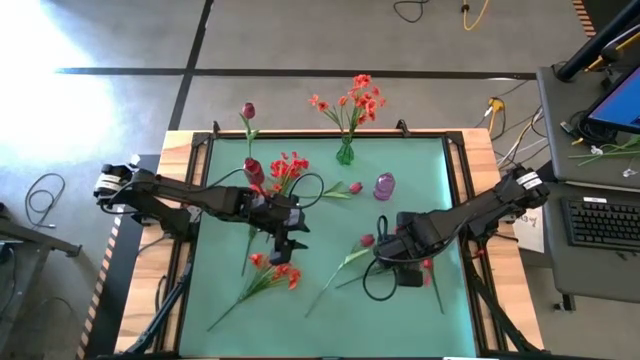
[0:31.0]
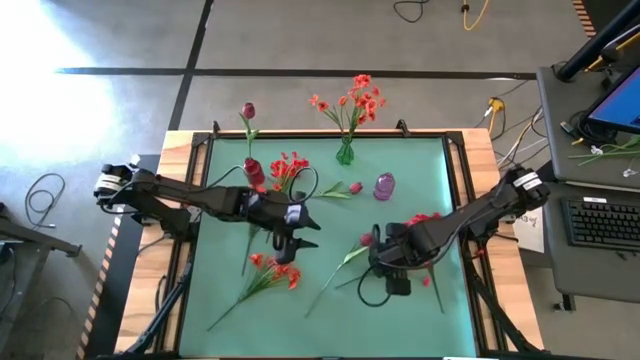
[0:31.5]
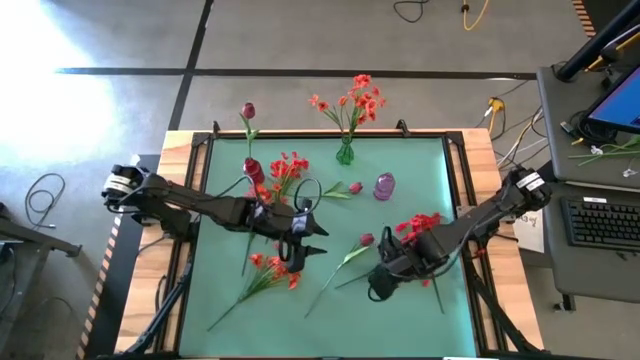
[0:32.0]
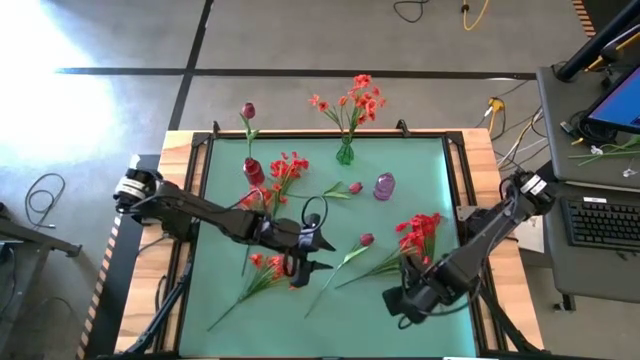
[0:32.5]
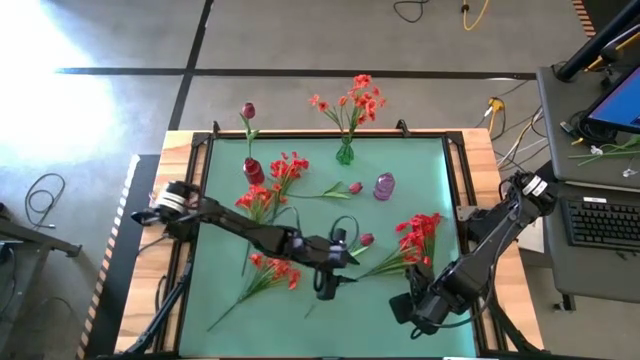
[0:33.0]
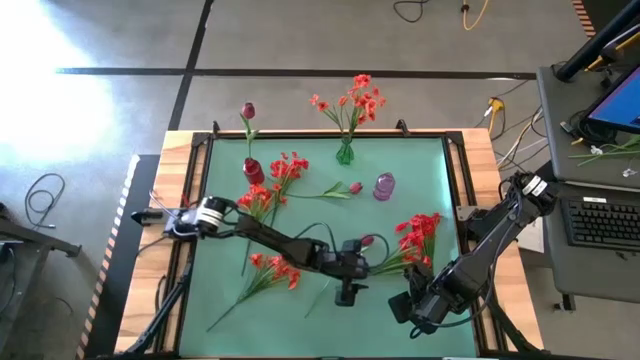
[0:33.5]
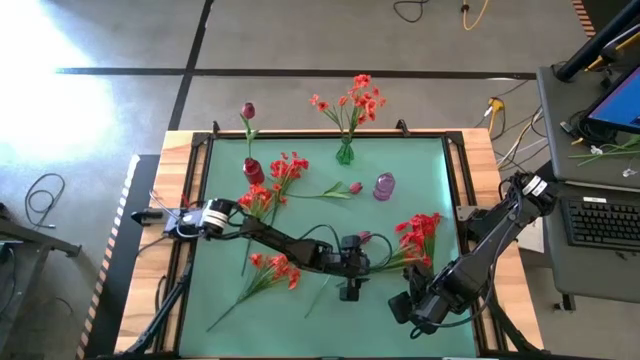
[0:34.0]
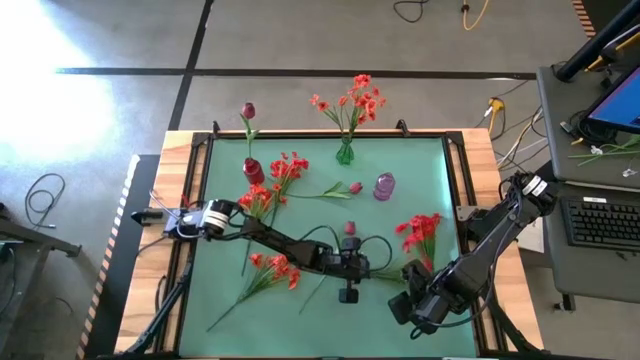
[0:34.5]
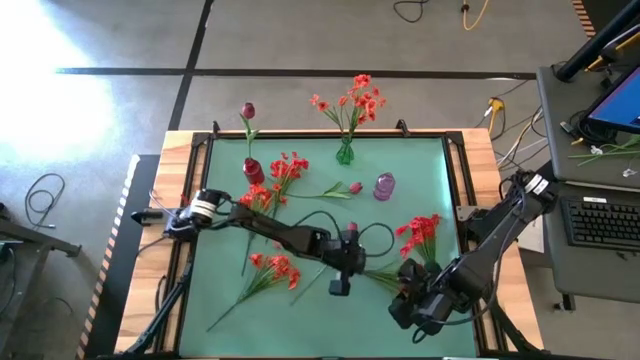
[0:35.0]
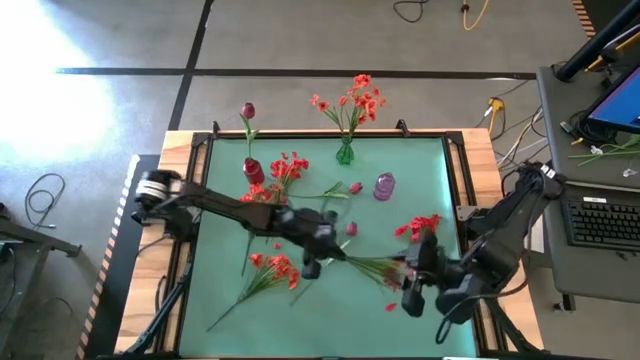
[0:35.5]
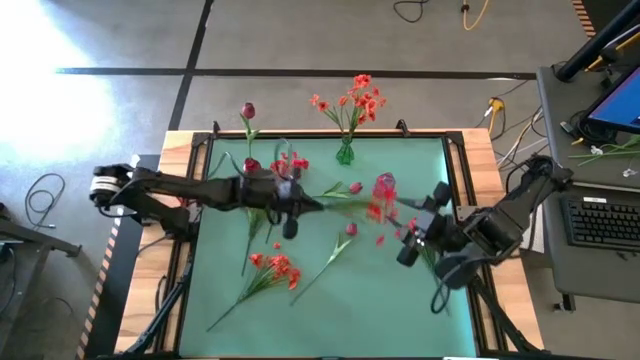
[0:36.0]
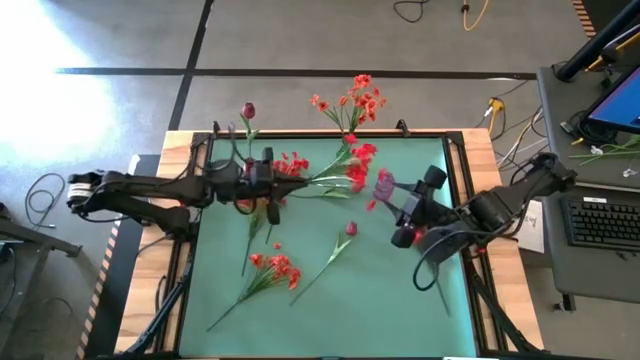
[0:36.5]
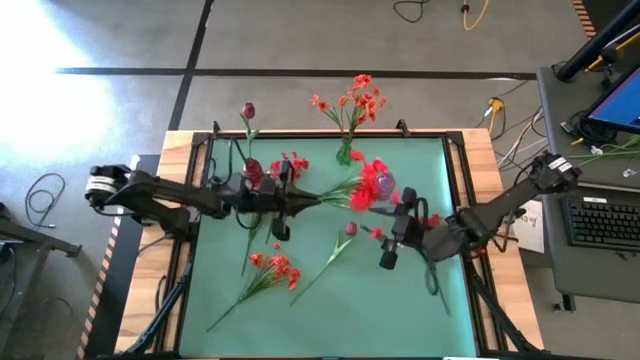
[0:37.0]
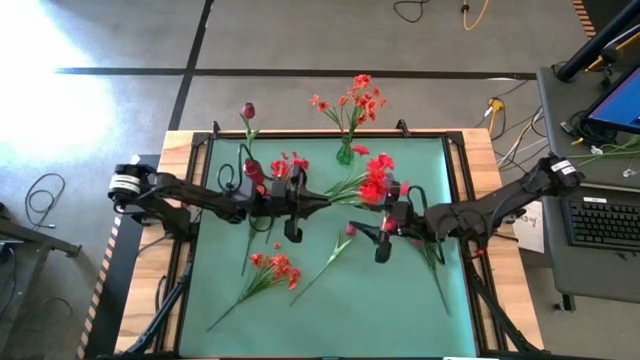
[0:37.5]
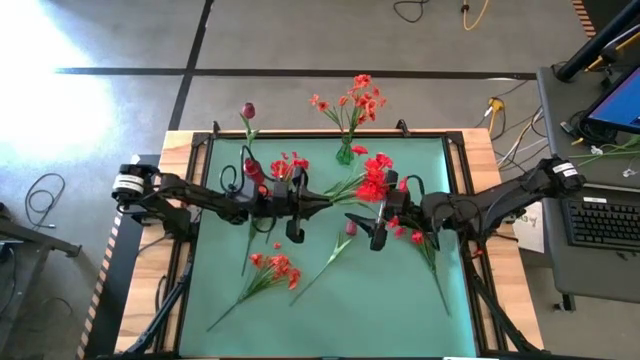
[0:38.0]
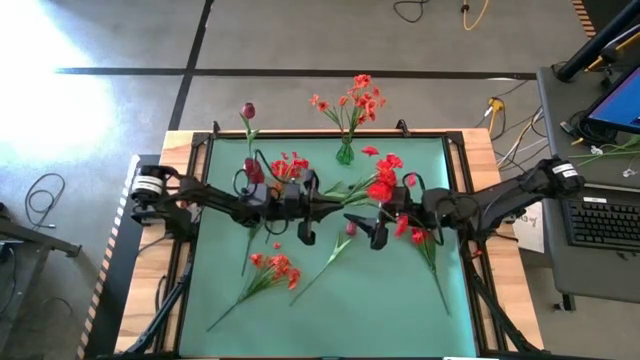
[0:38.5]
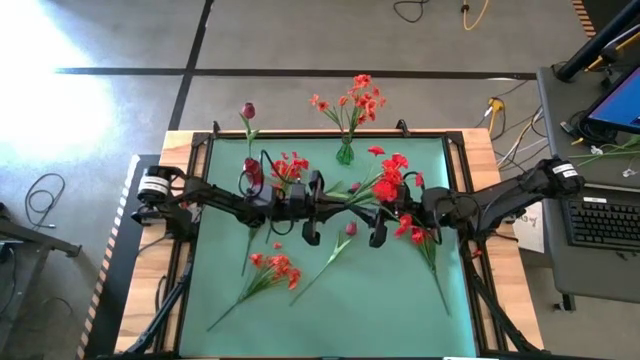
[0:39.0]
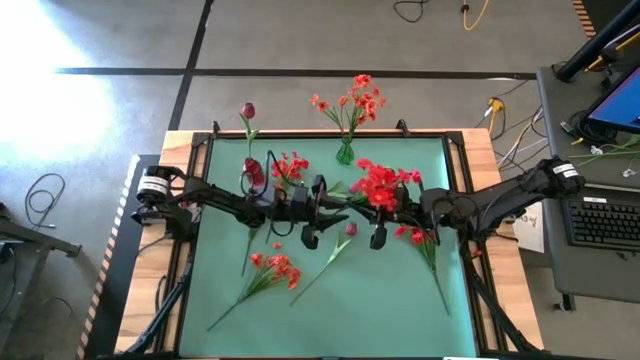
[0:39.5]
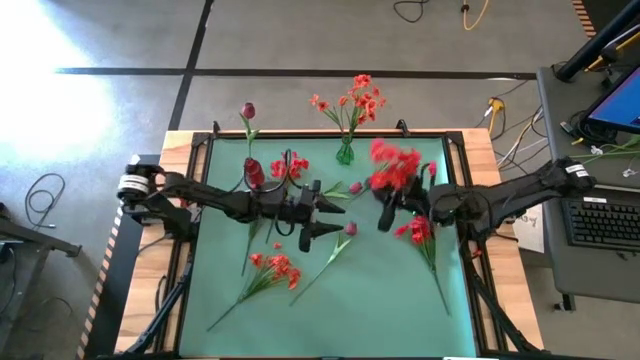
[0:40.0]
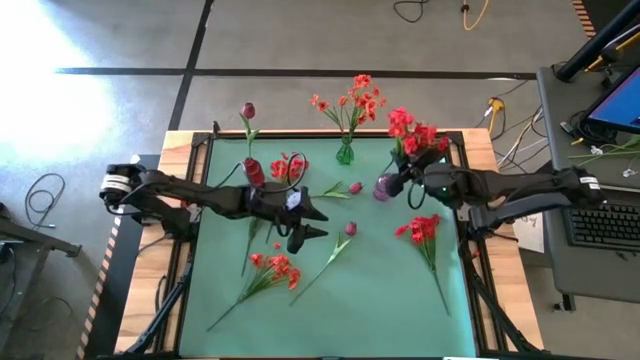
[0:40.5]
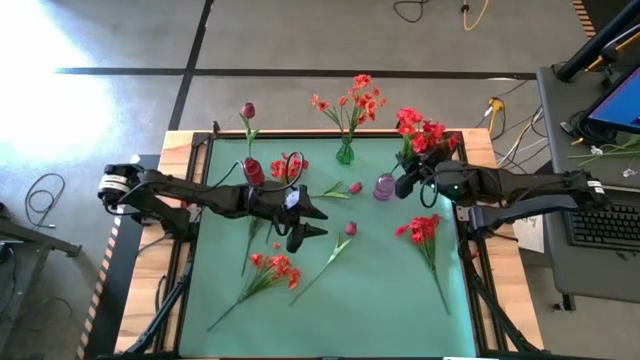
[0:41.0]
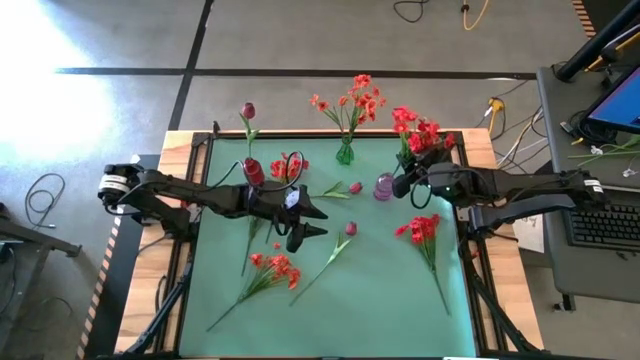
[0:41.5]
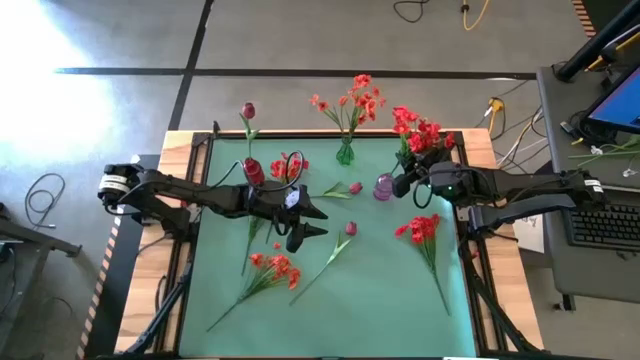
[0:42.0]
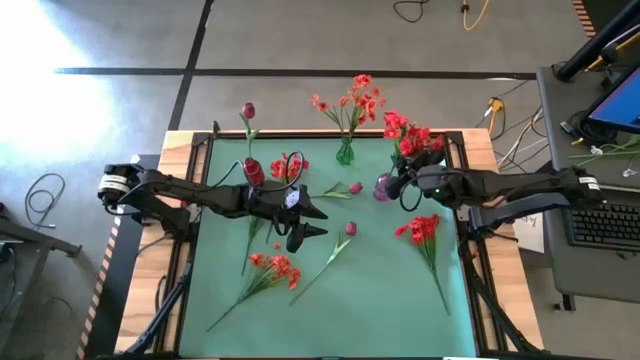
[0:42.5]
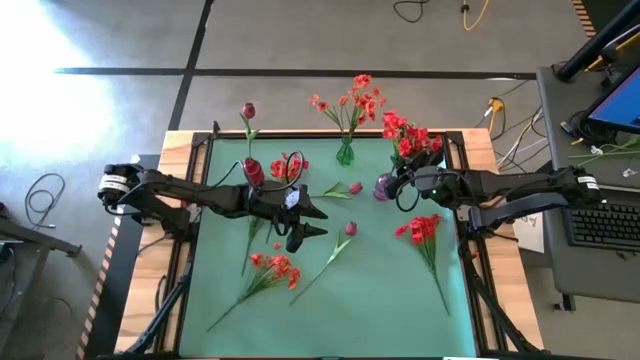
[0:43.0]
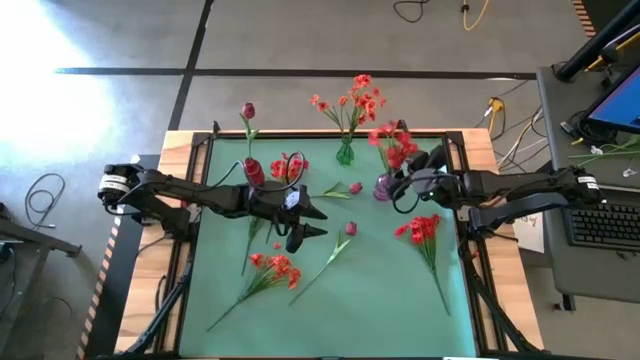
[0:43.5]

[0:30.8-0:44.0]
Task: Sort flowers into vase by color
Put the bottom red flowers into the violet flower vase

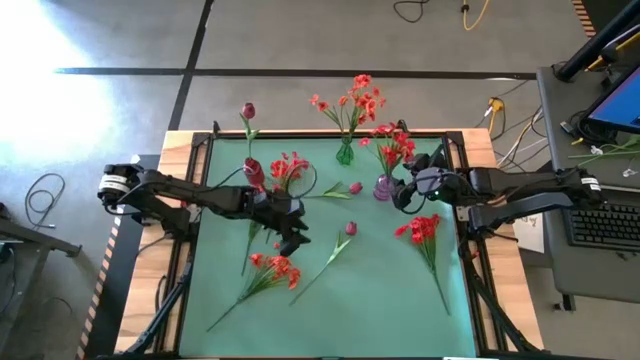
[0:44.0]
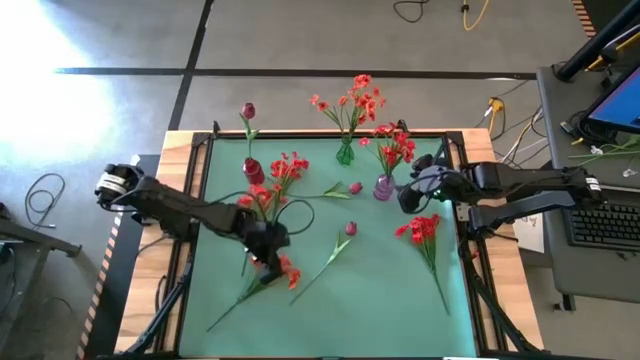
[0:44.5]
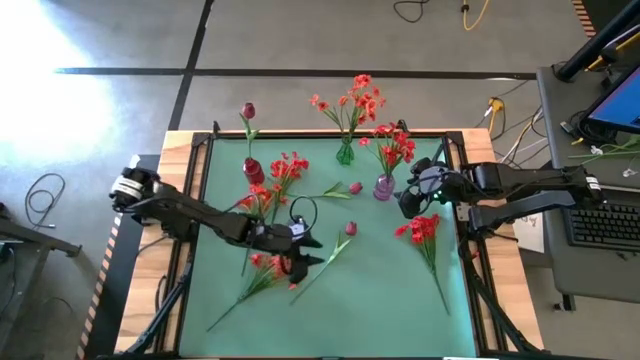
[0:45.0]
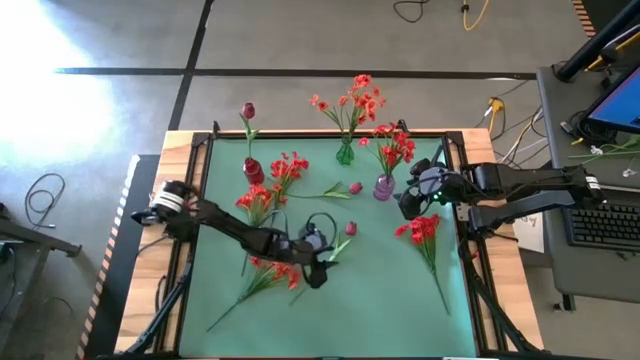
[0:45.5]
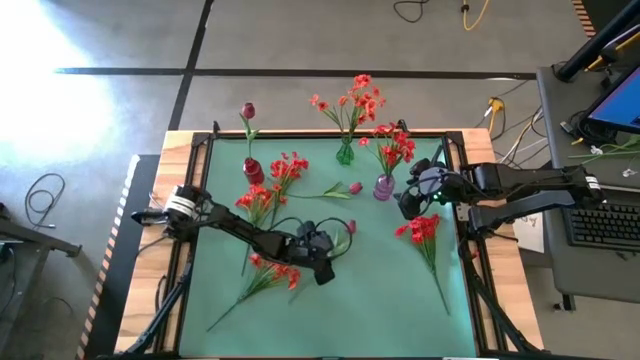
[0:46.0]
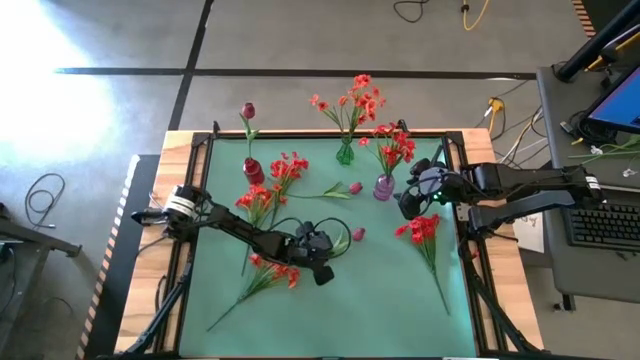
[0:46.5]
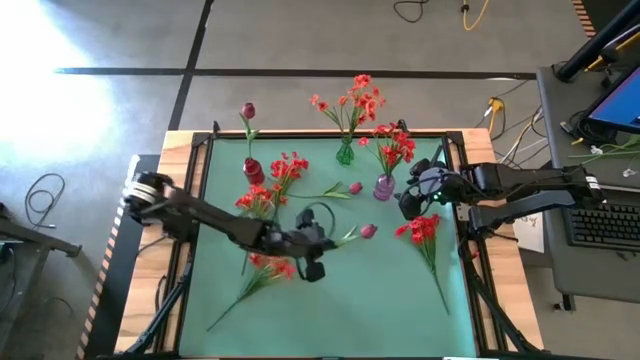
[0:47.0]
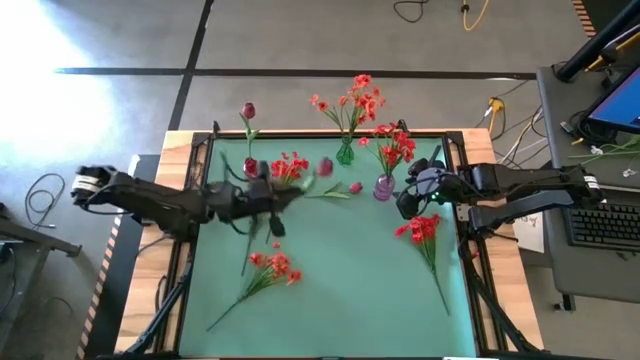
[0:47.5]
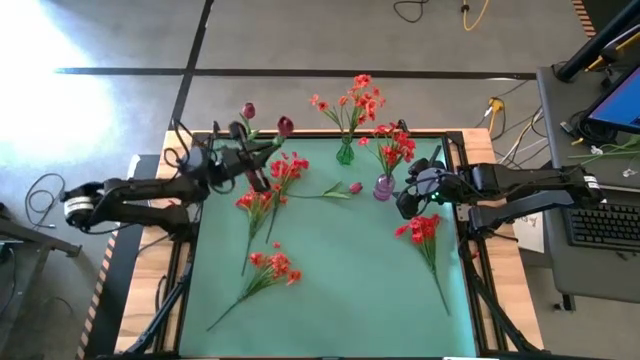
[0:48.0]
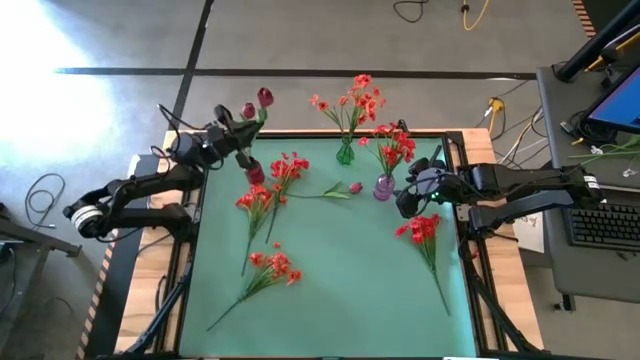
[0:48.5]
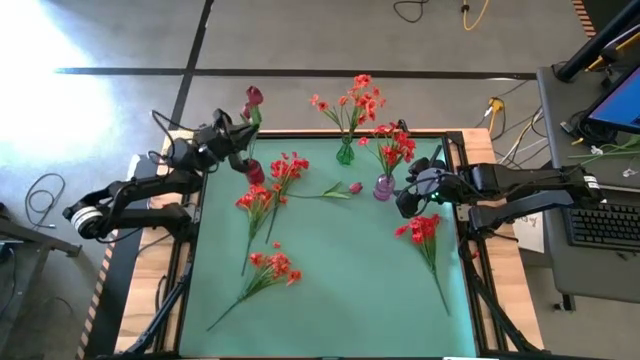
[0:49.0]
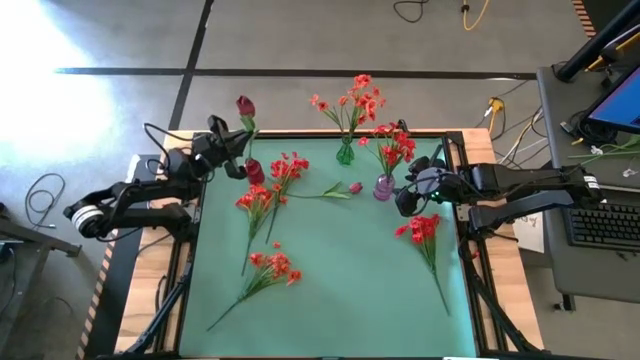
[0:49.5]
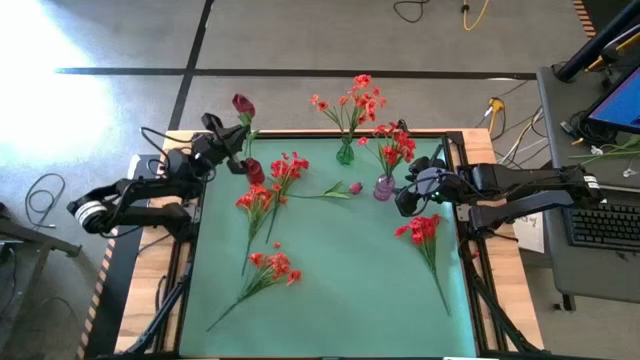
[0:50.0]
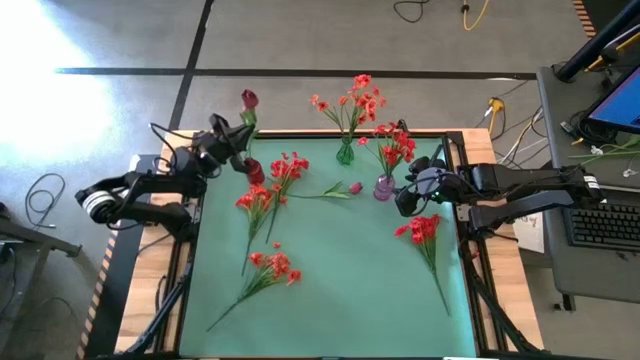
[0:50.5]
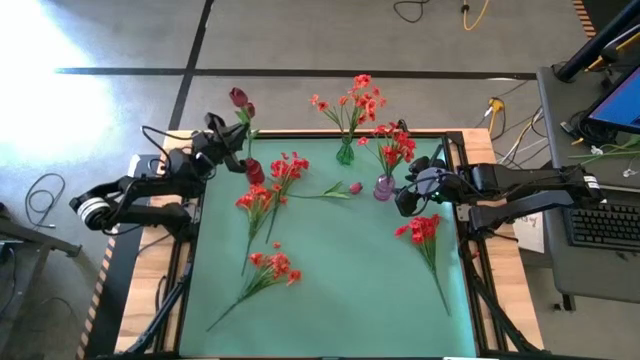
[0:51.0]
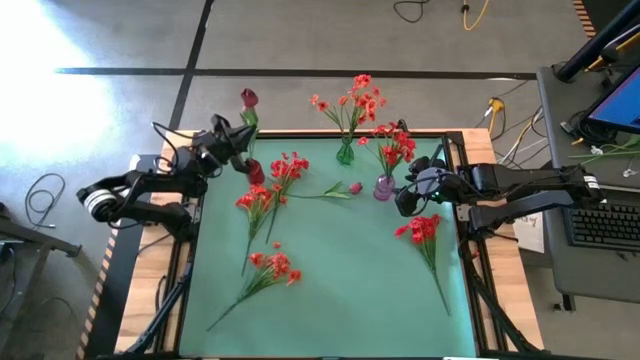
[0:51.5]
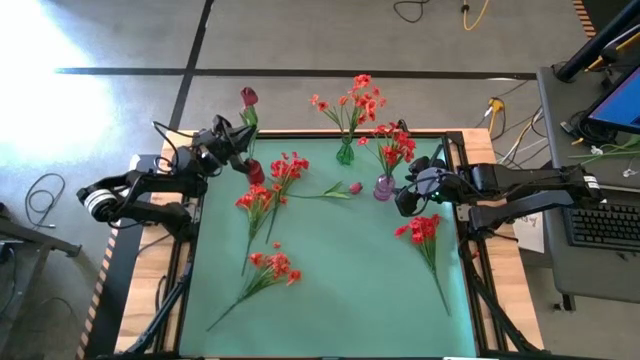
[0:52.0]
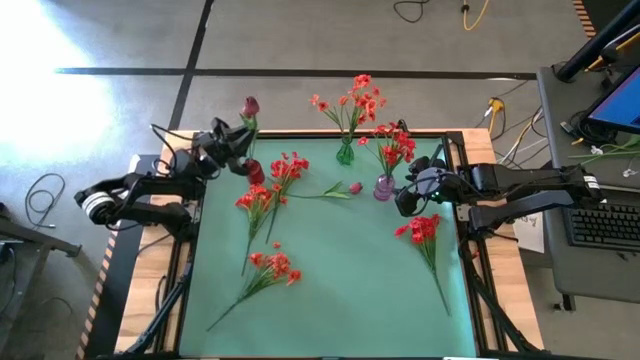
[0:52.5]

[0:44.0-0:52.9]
Put the bottom dark red flower into the red flower vase
